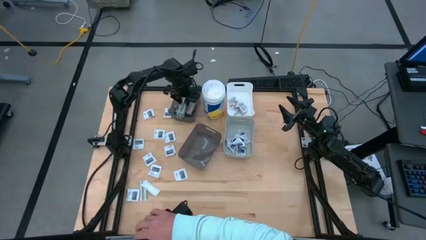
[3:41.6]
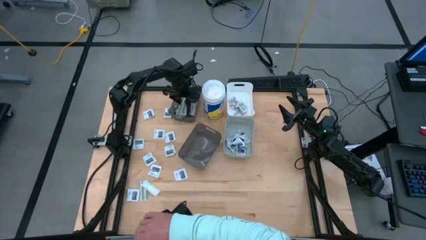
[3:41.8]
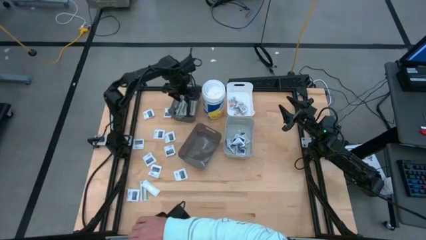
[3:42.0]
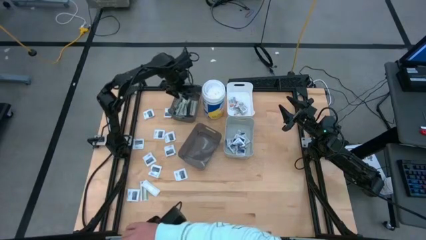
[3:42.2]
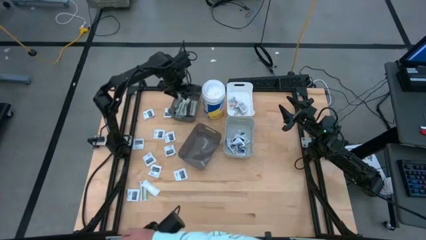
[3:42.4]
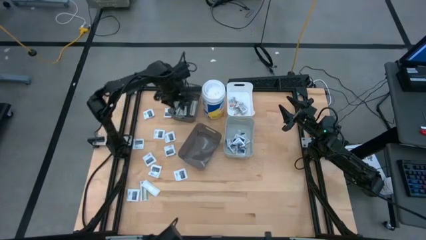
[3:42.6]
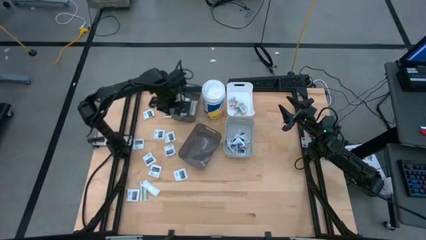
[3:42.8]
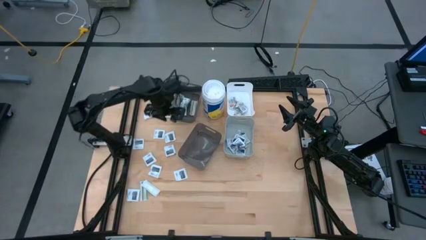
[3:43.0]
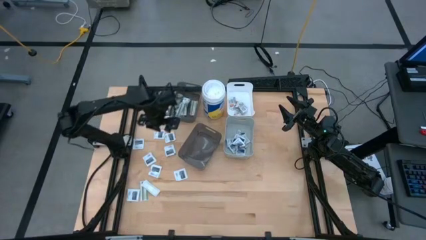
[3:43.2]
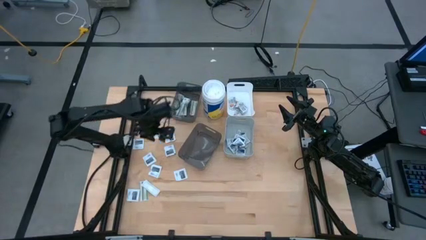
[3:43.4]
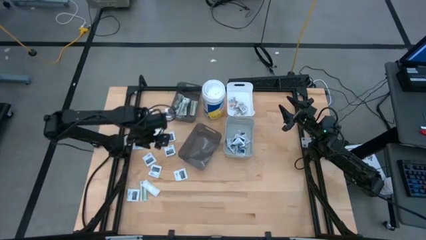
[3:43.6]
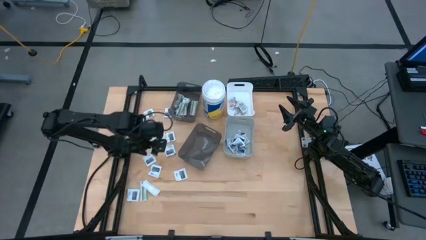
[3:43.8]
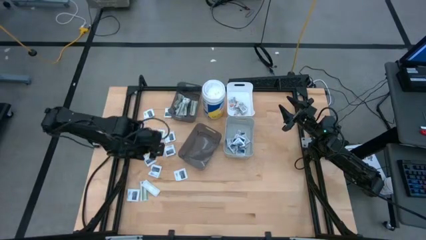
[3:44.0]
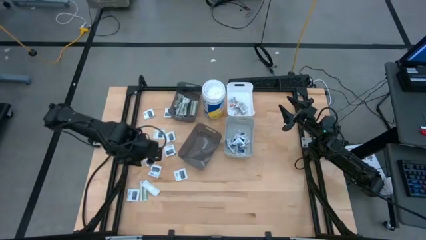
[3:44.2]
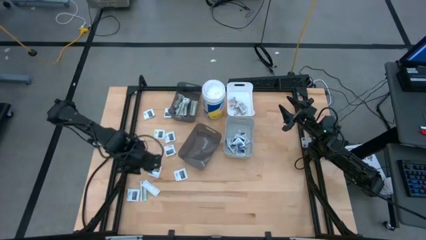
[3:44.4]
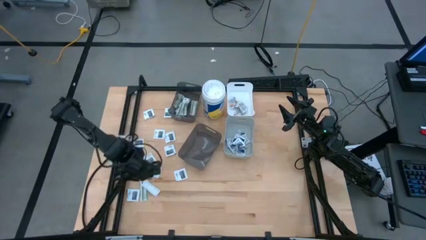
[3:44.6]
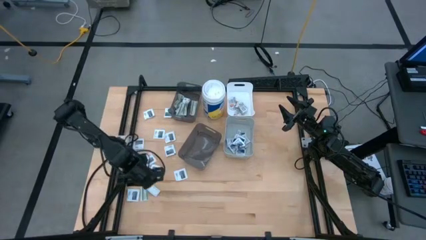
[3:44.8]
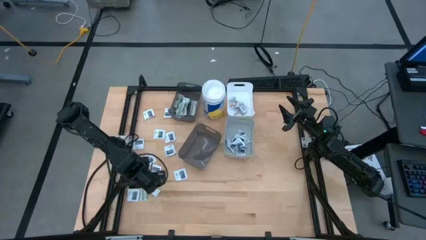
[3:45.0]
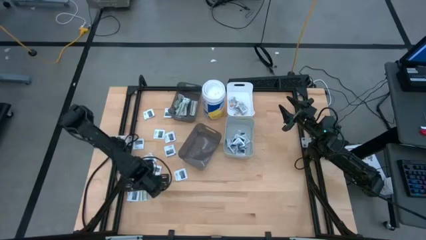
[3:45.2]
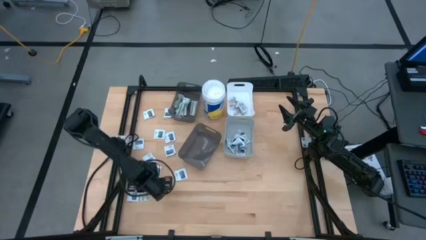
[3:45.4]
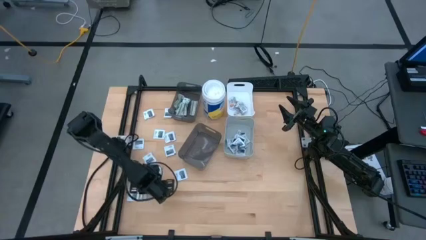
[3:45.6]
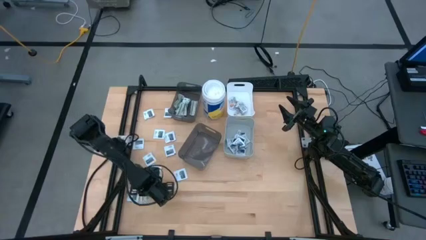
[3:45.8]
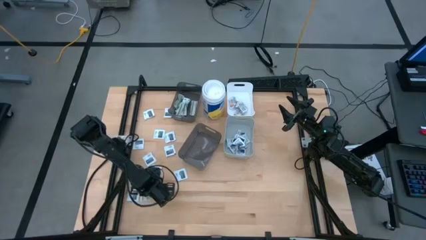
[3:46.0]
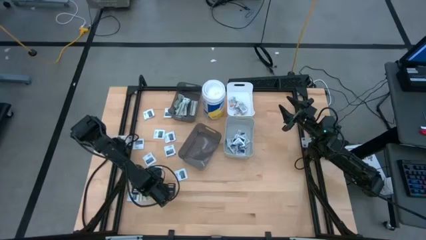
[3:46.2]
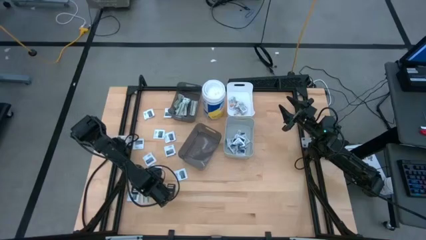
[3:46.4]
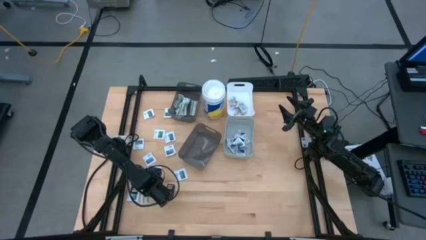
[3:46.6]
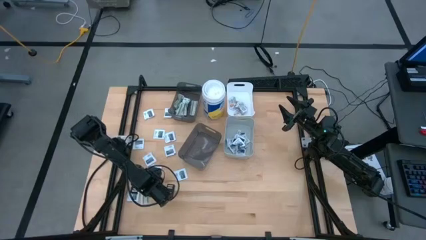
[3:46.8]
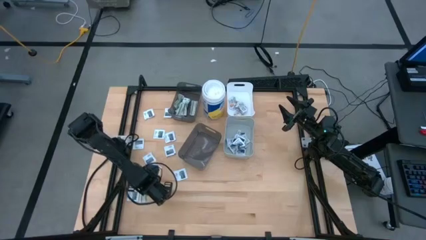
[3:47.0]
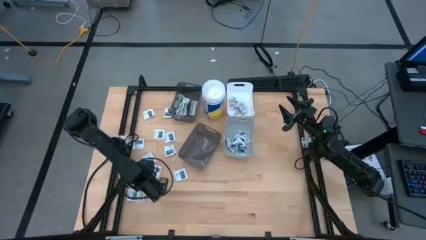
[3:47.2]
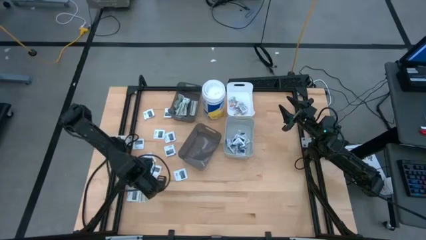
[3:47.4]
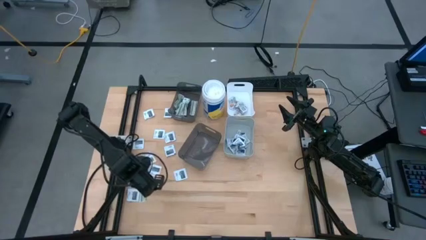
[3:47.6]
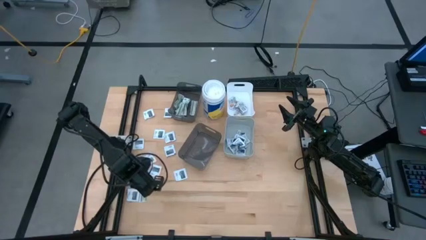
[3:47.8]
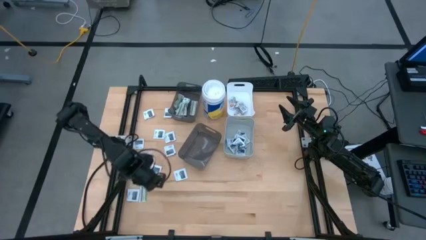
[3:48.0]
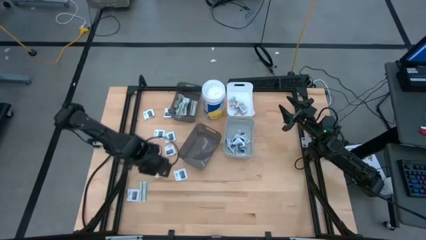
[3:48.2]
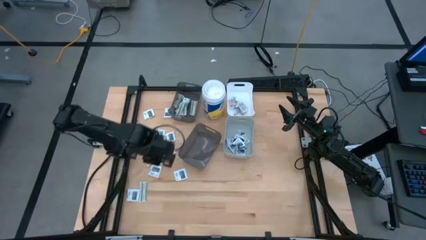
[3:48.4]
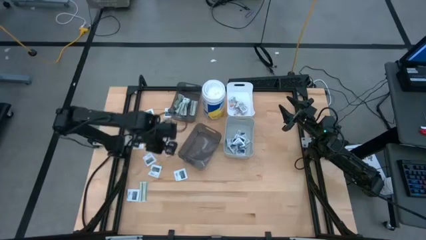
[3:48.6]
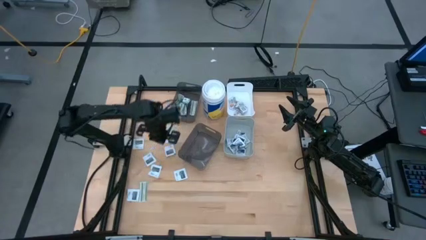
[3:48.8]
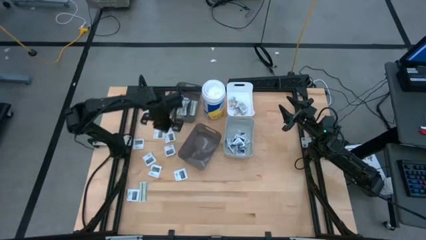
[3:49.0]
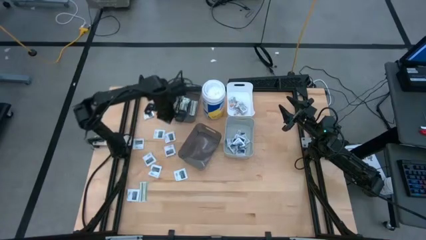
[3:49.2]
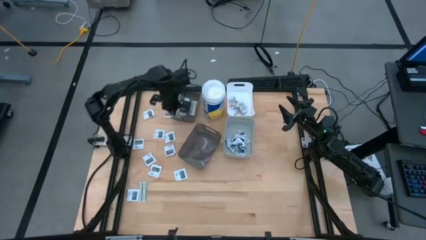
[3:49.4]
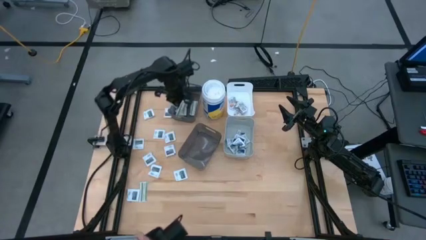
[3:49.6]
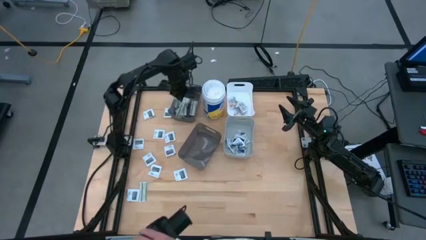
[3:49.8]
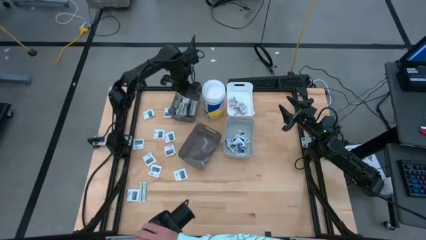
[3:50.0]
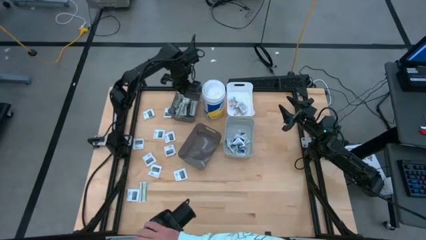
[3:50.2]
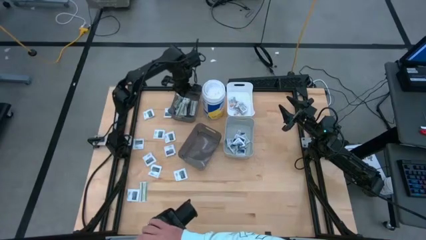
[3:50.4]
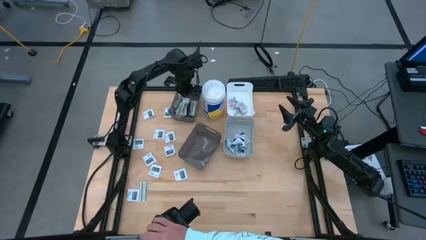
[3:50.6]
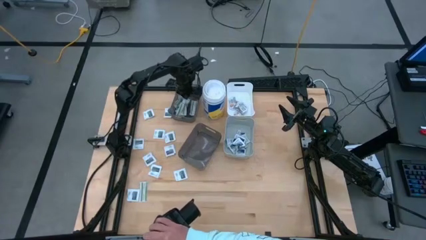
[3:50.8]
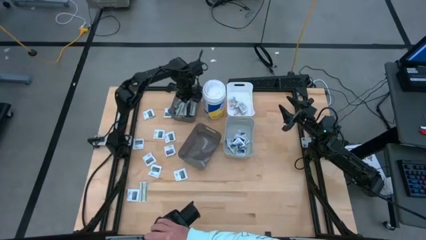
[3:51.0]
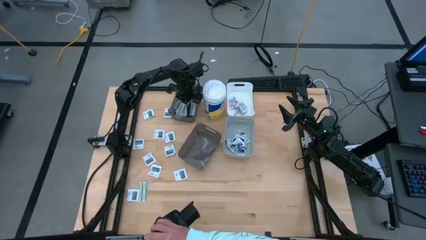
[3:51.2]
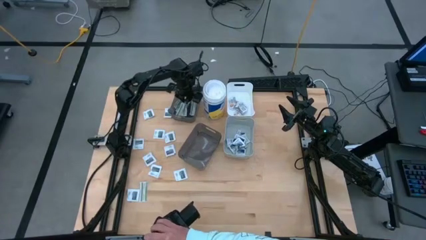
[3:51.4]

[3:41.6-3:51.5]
Task: Pick & Place First Aid Supplies
Put the right bandage pack into the top black bin

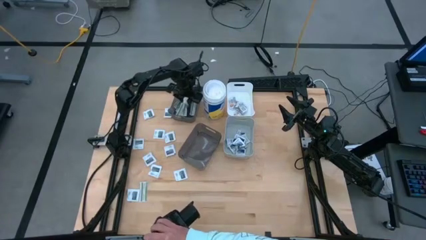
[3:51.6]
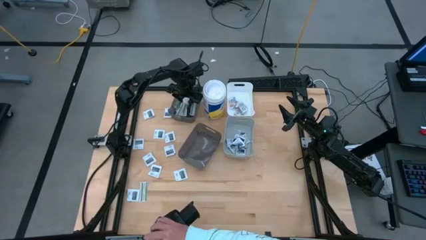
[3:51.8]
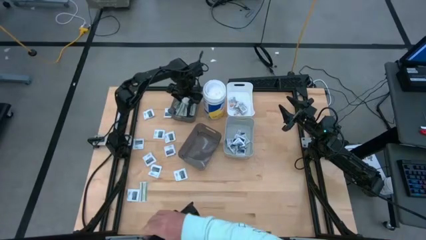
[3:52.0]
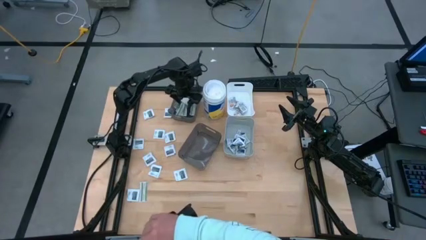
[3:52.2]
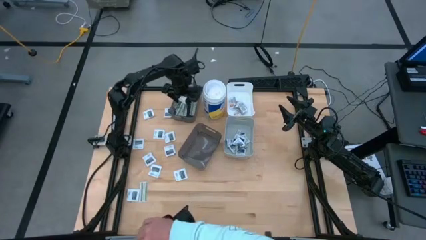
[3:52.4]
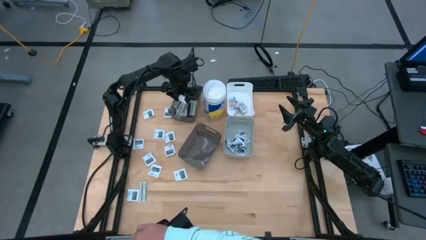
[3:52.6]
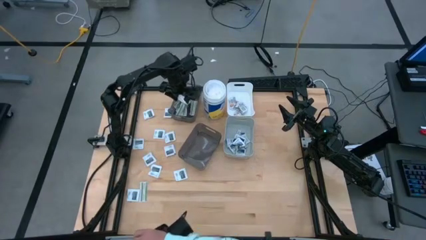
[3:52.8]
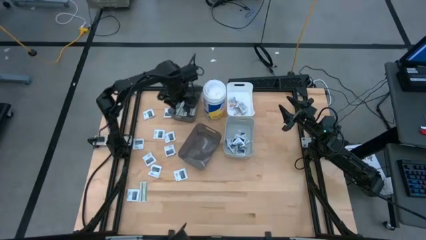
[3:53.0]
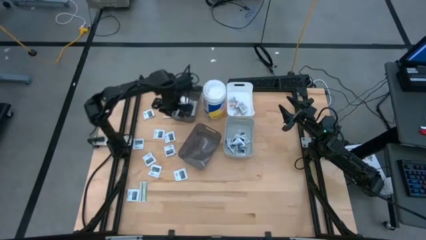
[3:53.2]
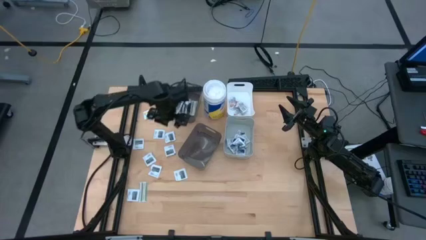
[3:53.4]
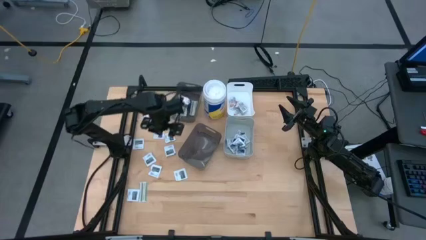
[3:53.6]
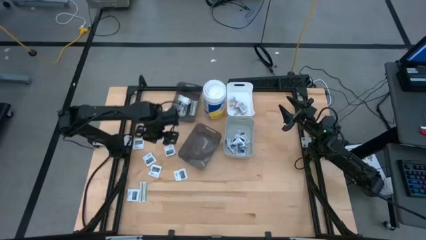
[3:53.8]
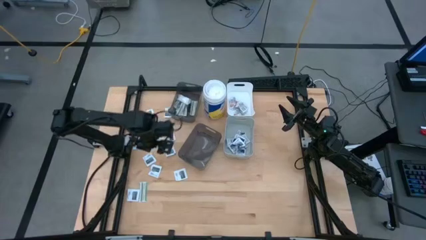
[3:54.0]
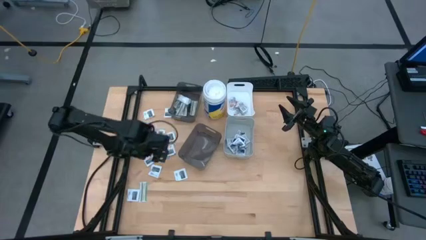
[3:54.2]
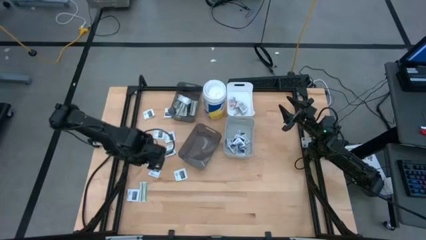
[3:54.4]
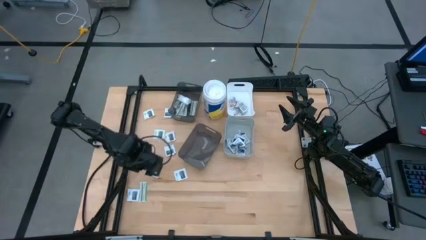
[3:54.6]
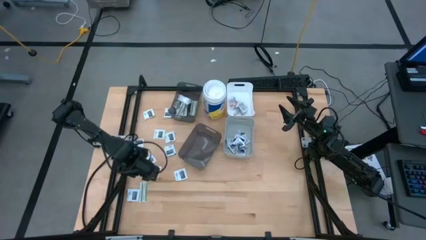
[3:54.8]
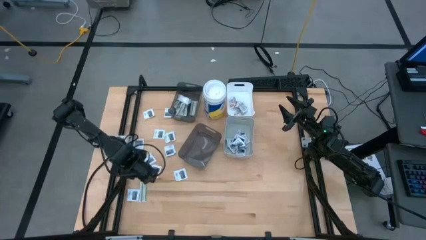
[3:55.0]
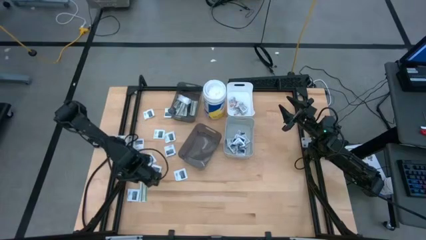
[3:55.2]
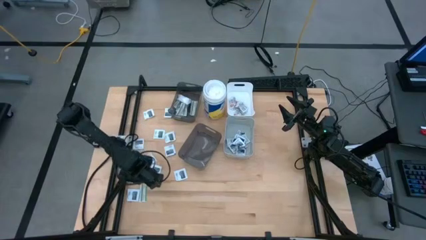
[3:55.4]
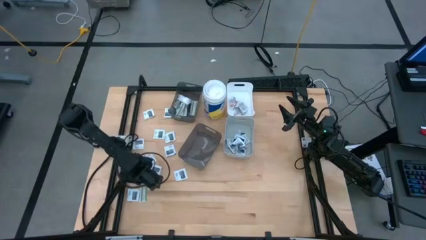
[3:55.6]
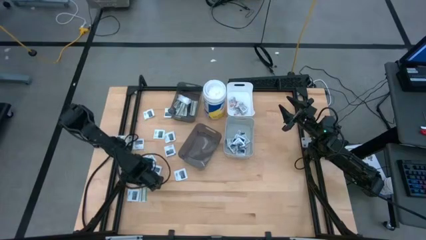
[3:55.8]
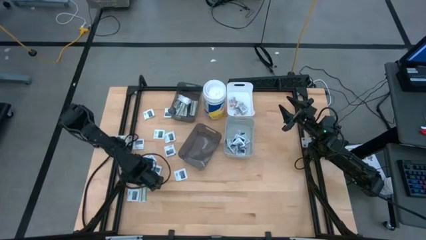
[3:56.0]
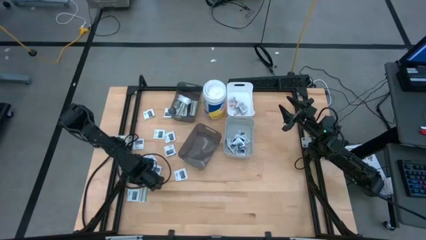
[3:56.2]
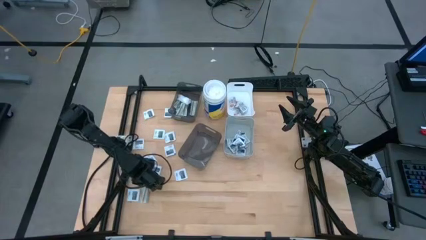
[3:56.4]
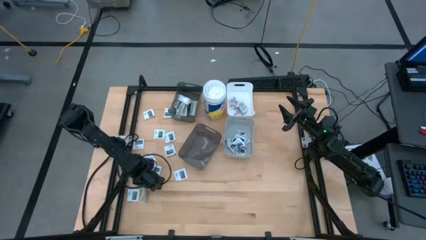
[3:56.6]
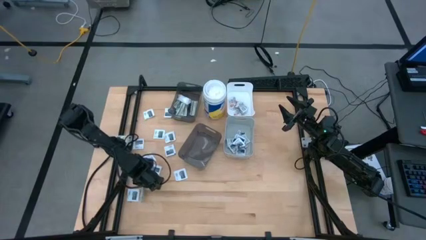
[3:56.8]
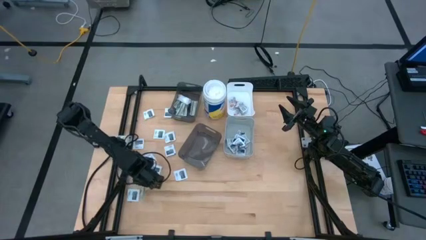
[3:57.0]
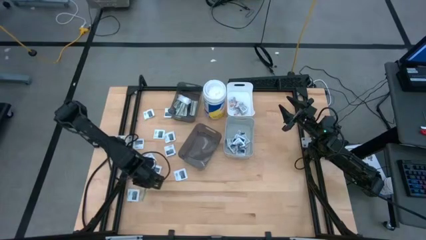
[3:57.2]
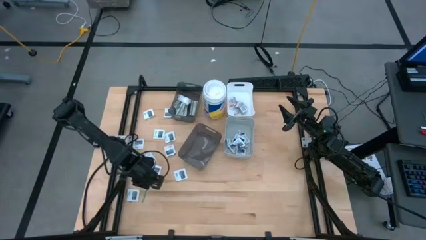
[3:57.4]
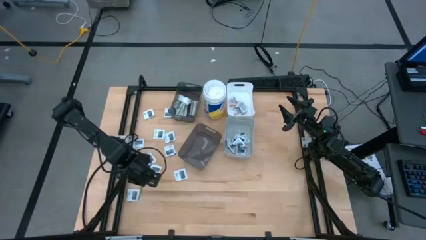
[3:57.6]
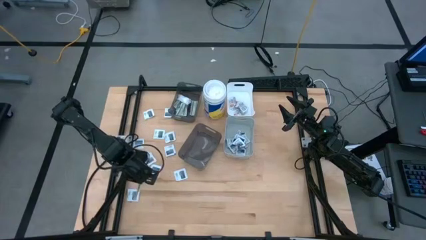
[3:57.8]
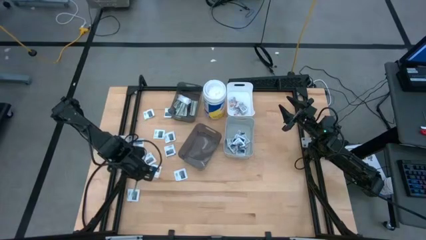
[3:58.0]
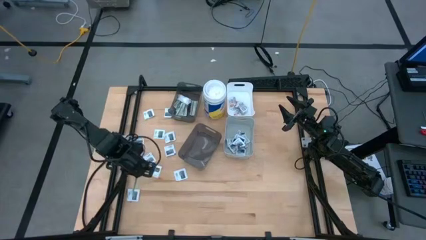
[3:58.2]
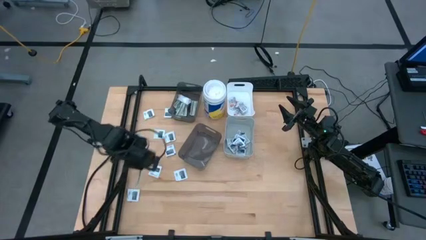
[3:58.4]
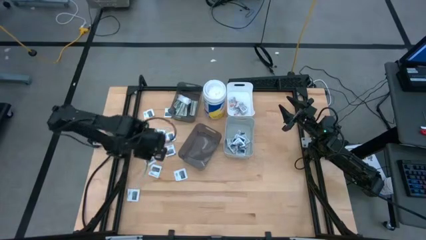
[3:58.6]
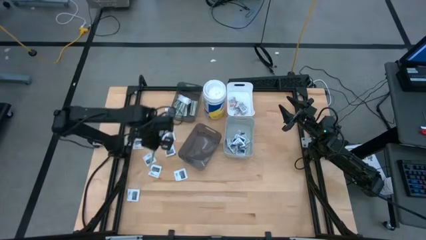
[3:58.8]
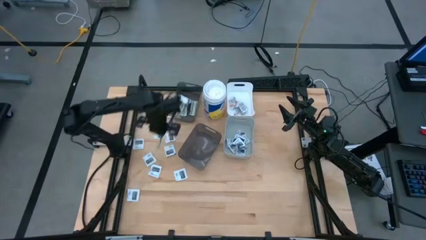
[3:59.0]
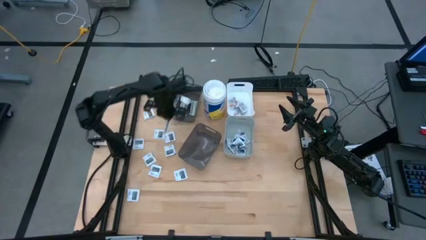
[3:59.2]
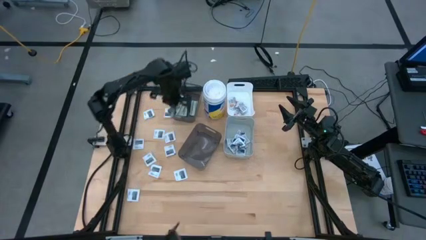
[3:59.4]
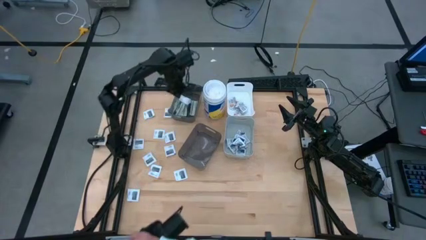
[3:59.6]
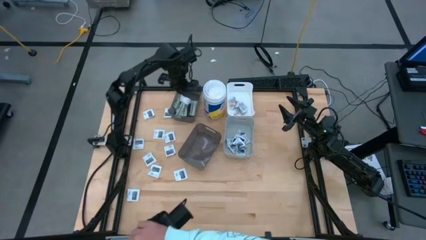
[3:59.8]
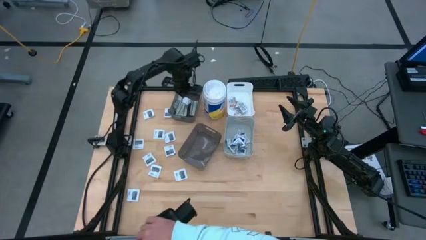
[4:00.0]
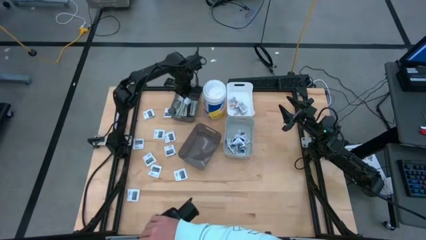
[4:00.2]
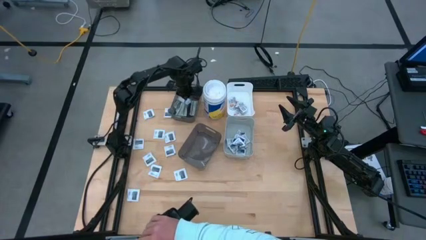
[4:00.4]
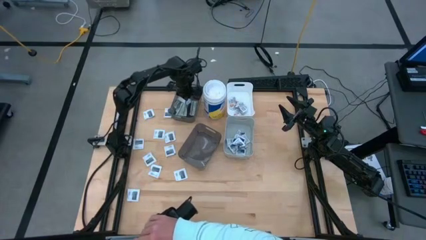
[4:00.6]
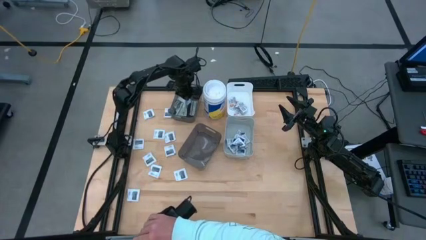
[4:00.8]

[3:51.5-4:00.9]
Put the bandage pack into the top black bin
